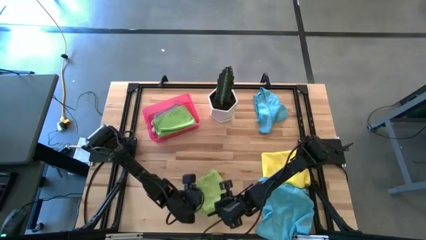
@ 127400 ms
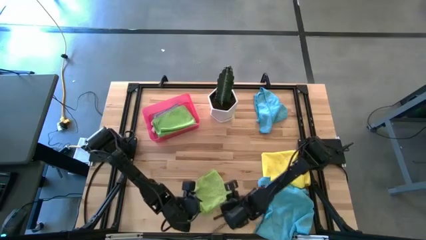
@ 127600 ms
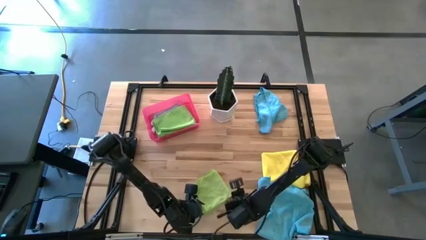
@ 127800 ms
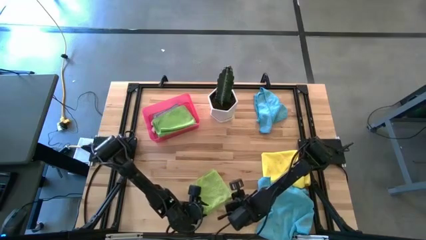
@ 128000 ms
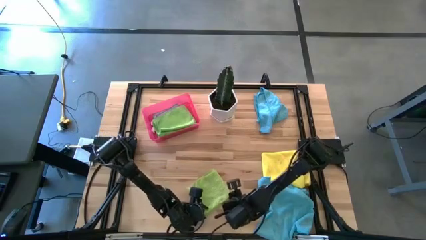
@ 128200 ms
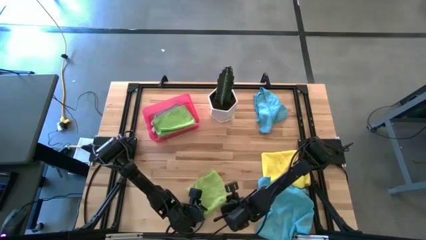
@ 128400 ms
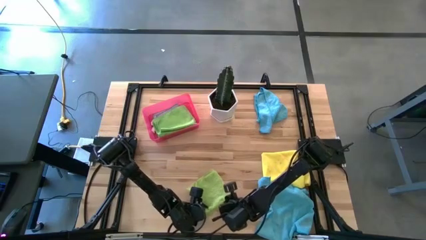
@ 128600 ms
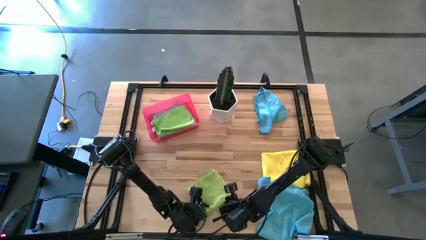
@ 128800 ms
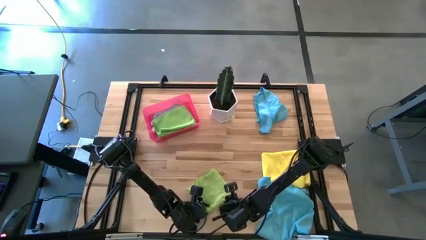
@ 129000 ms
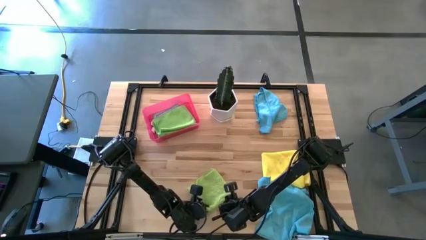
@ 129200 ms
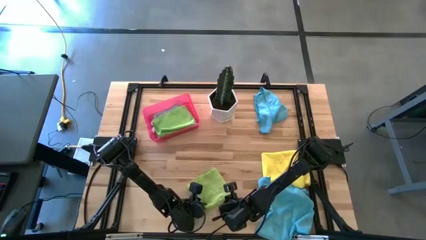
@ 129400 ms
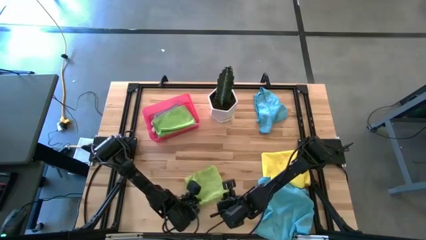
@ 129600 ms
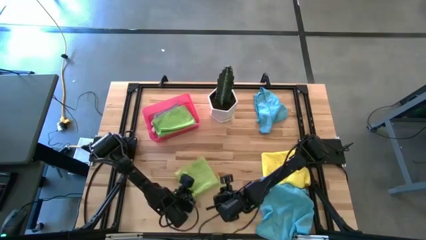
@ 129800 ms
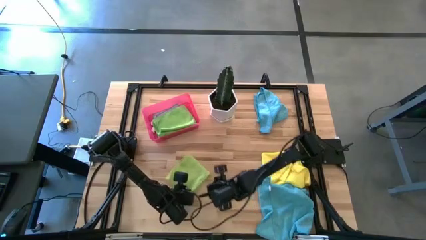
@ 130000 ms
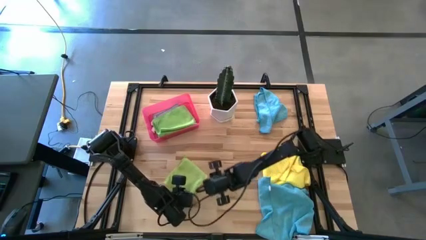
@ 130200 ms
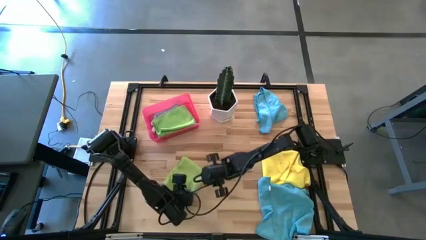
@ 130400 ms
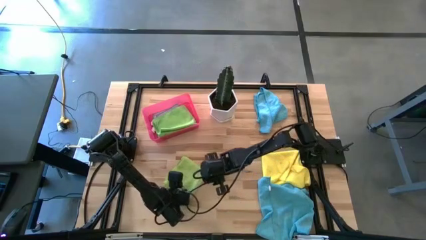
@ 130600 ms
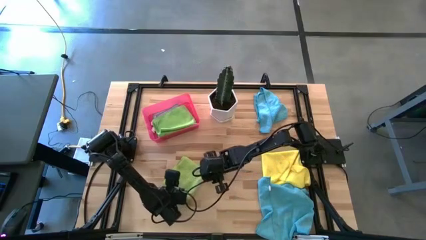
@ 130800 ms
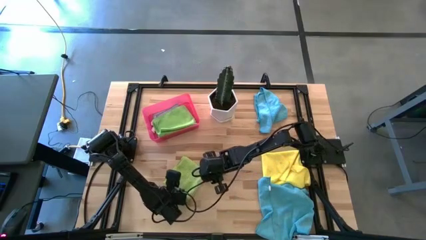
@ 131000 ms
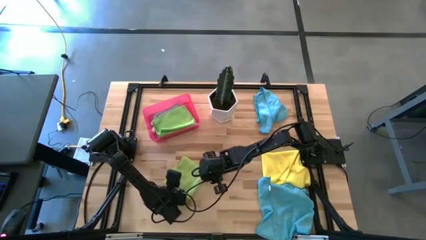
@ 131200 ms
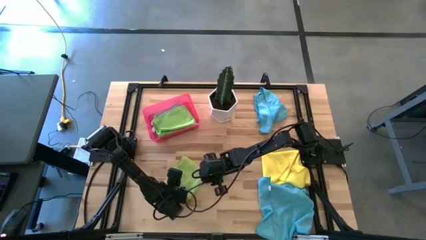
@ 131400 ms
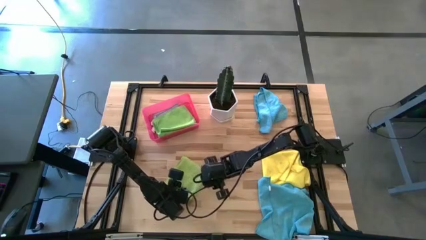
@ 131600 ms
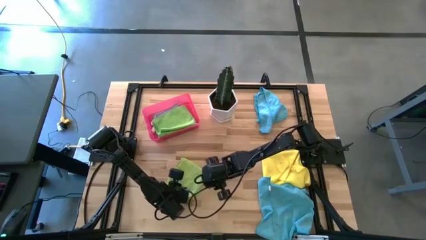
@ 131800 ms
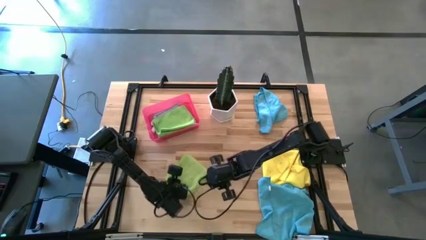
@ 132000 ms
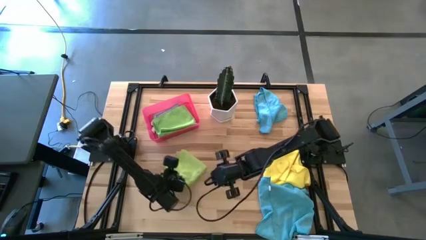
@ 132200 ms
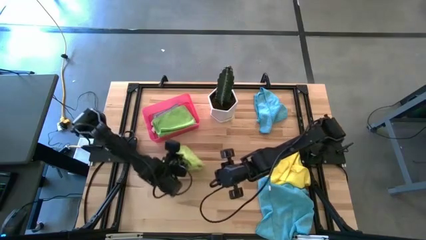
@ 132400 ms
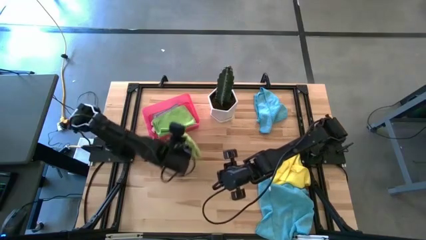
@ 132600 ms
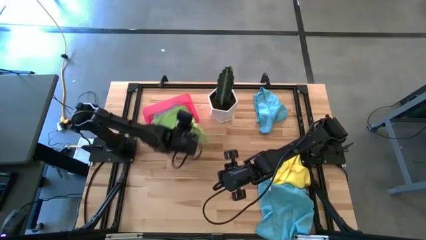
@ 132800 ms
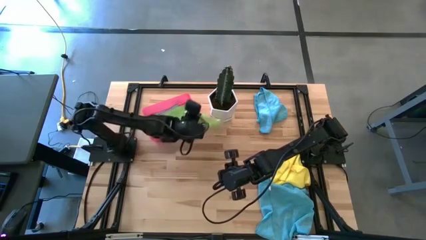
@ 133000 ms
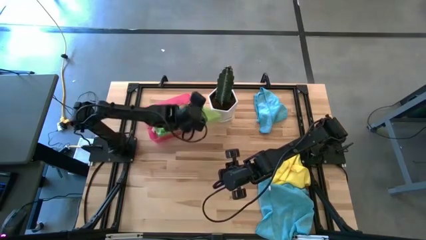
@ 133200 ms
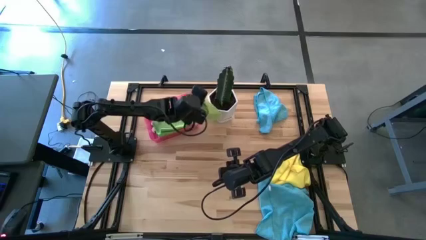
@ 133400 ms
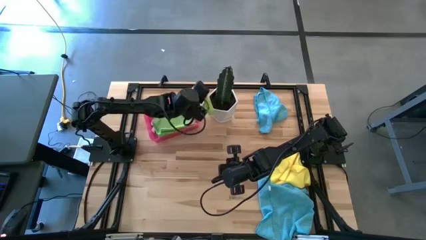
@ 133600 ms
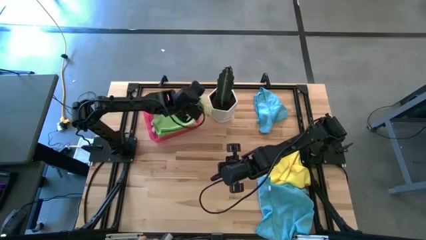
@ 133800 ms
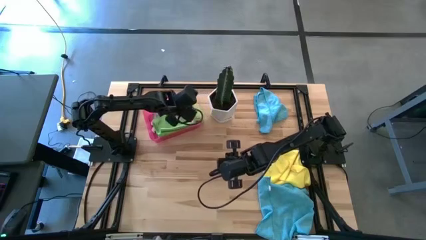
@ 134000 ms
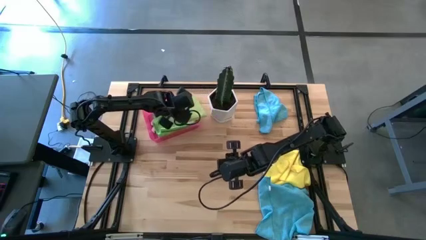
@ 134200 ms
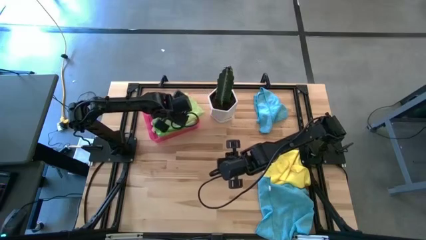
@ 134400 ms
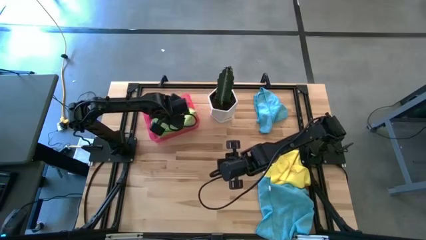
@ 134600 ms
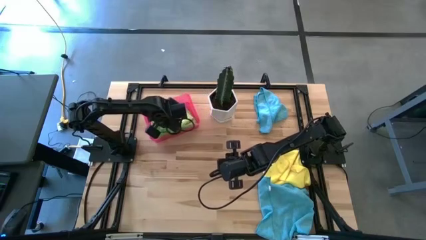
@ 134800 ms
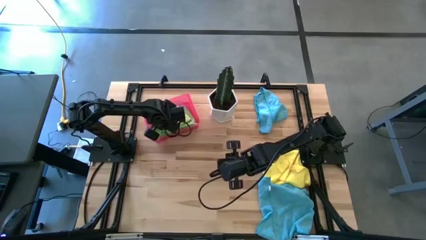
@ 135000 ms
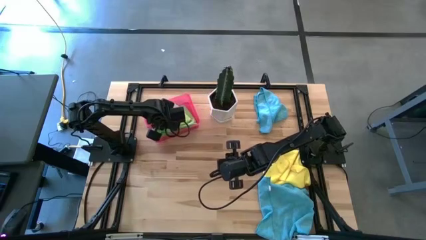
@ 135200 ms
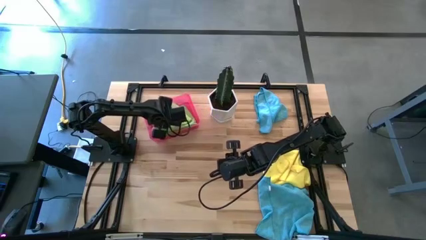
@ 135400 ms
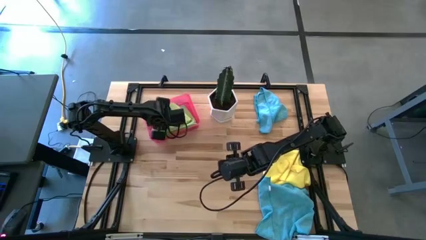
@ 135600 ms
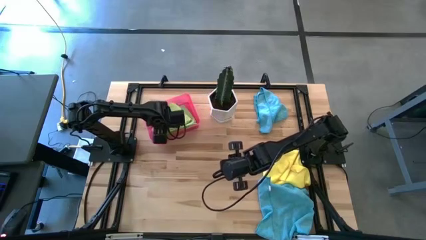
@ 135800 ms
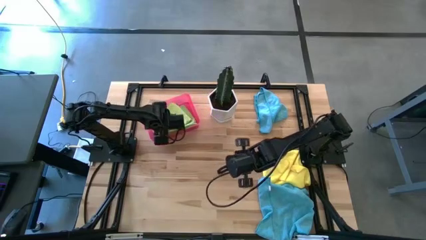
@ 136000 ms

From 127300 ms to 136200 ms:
Task: Fold microfiber towels
Put the folded light green microfiber cloth into the transparent pink bin

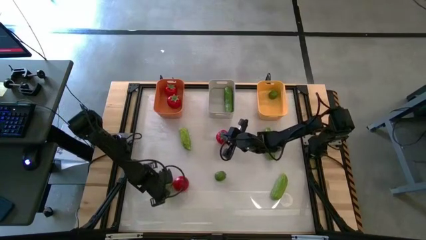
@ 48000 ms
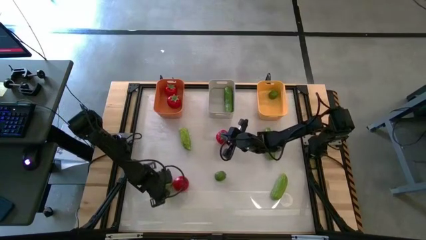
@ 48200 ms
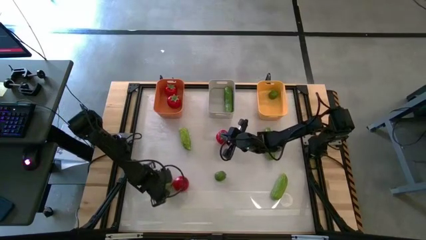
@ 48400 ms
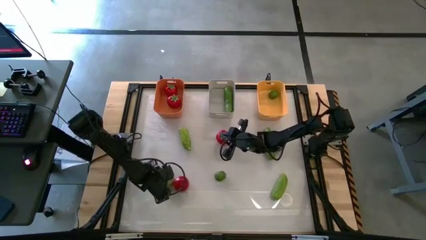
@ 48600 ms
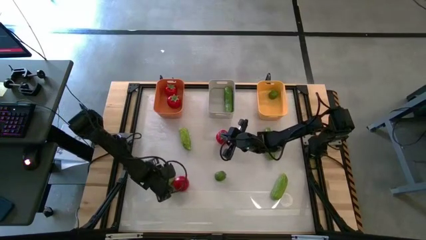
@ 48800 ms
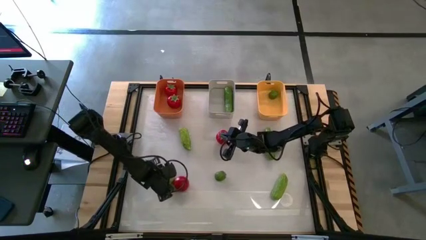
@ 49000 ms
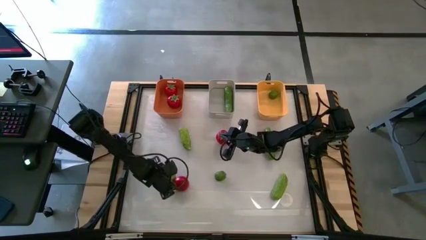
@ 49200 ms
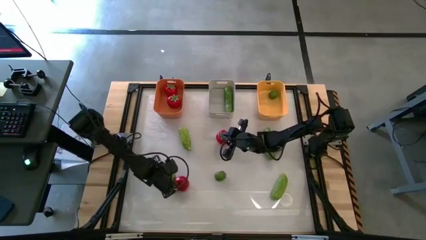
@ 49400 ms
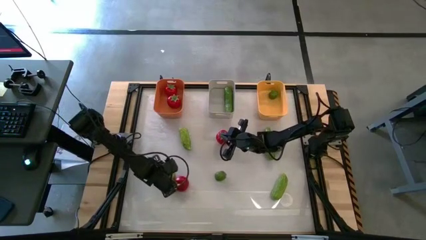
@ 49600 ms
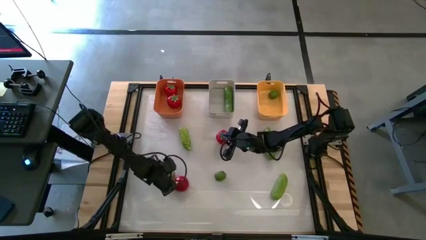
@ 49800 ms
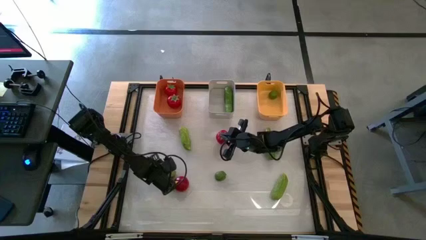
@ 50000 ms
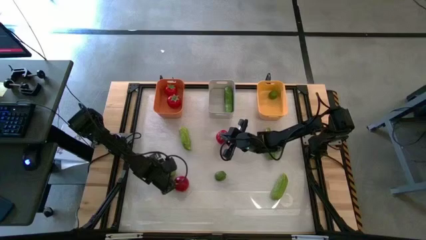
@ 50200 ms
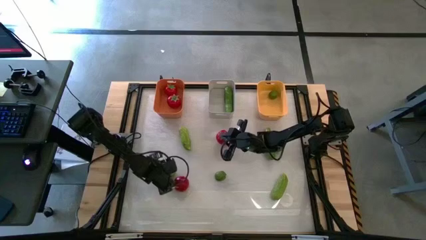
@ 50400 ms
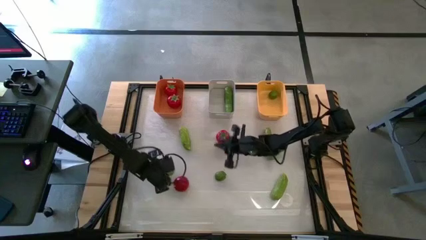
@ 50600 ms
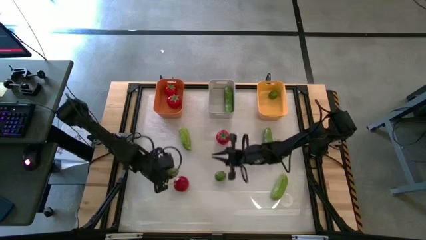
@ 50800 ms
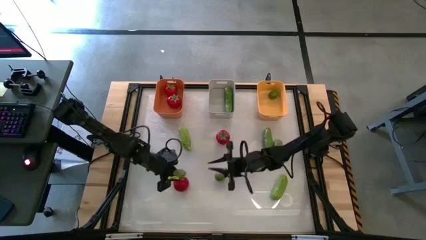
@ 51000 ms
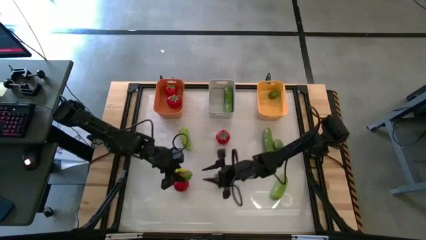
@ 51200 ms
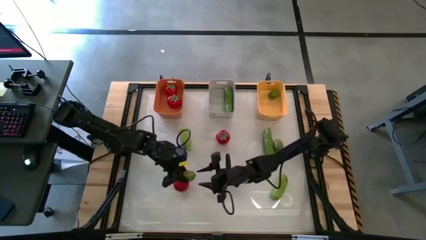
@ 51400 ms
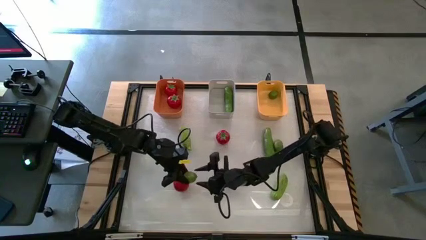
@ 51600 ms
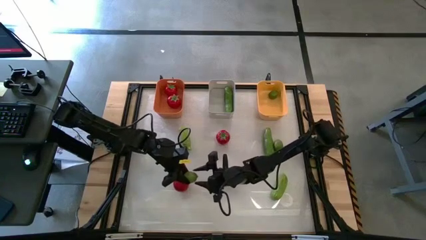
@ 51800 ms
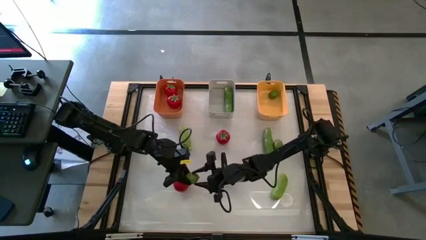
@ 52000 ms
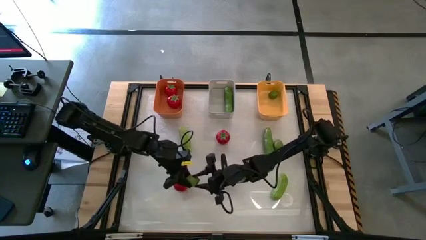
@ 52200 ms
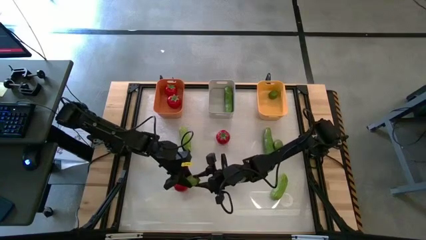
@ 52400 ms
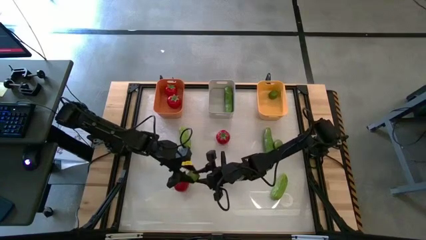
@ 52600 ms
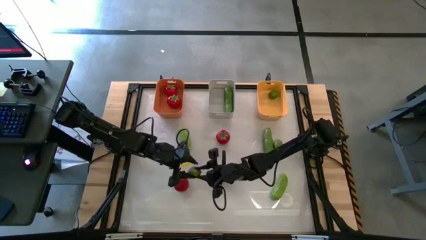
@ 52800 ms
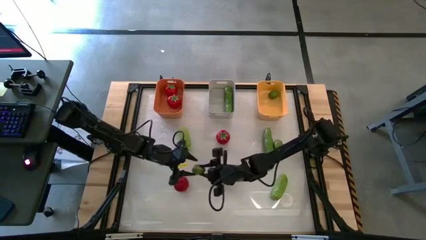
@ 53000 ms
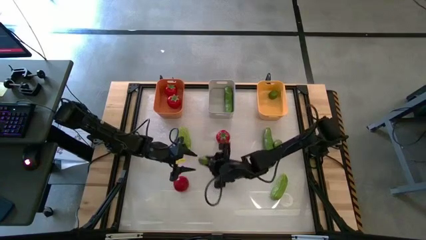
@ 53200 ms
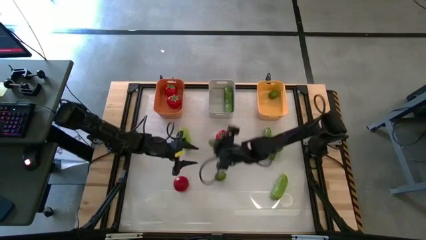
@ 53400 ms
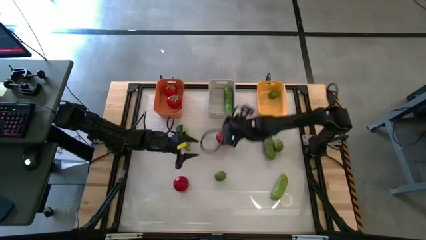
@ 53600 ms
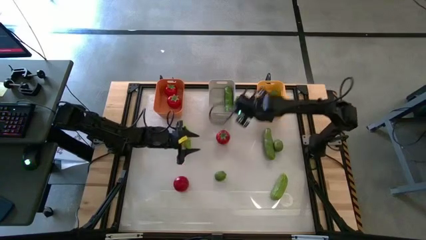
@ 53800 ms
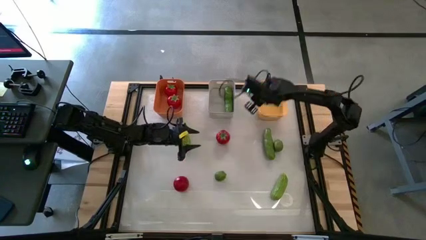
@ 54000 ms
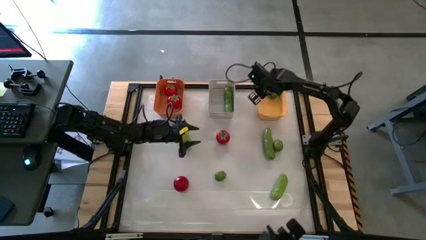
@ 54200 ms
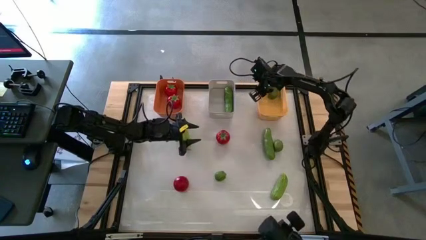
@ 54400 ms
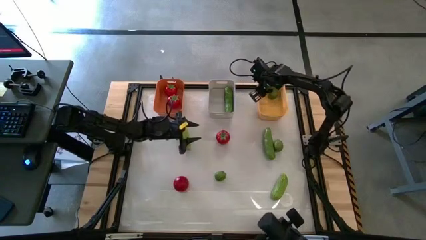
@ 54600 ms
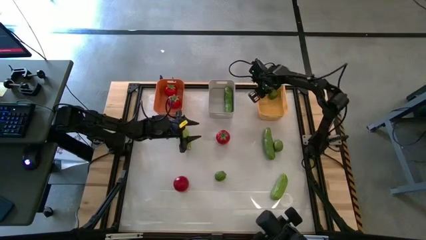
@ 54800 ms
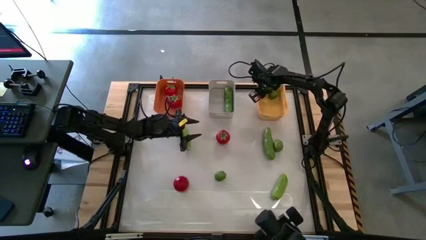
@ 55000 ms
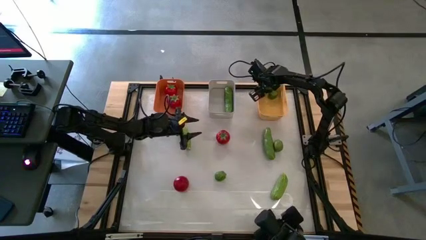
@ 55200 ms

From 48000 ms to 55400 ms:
Task: Sort produce into baskets
Put the bottom left lime into the yellow bin
